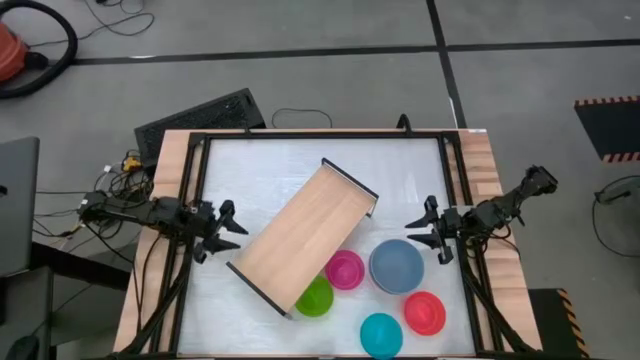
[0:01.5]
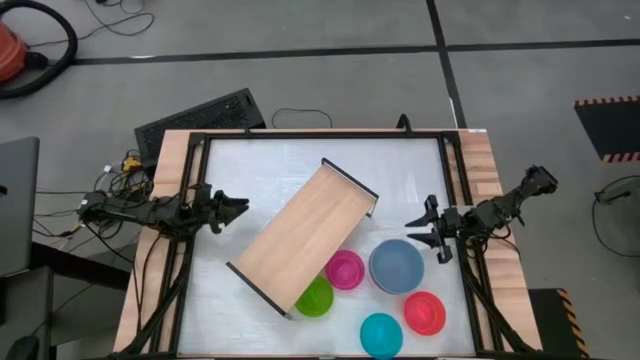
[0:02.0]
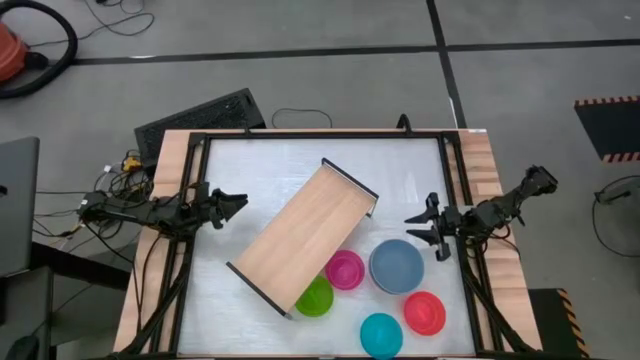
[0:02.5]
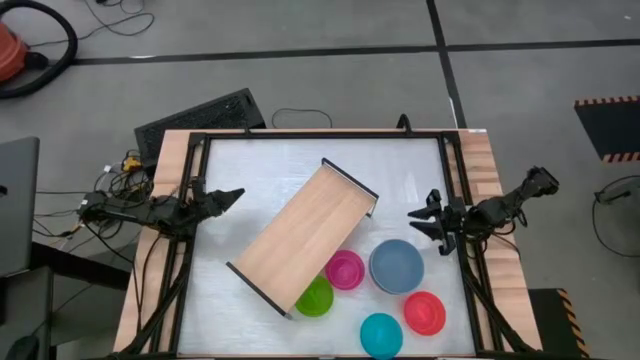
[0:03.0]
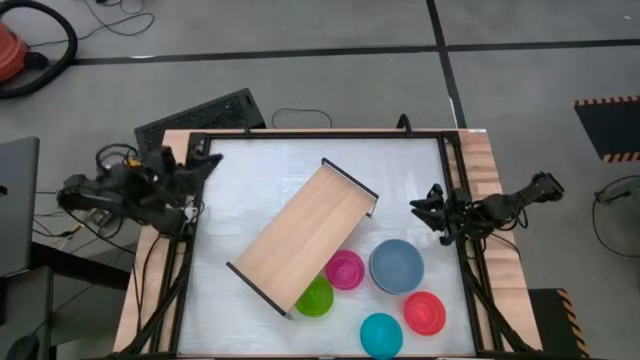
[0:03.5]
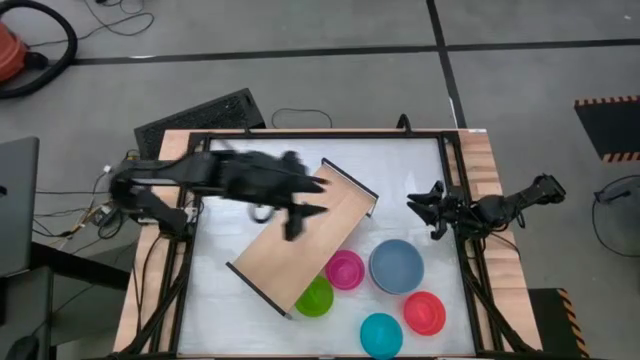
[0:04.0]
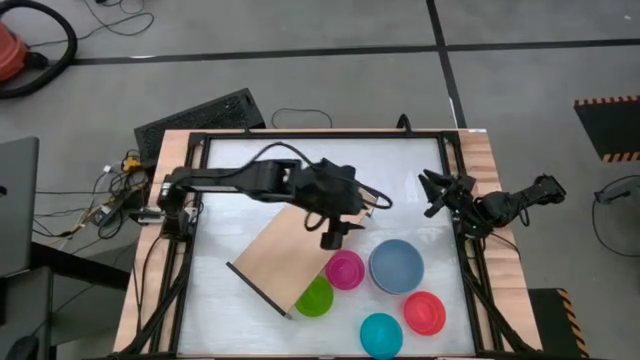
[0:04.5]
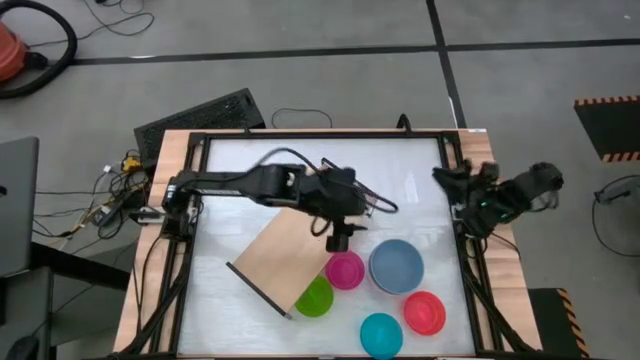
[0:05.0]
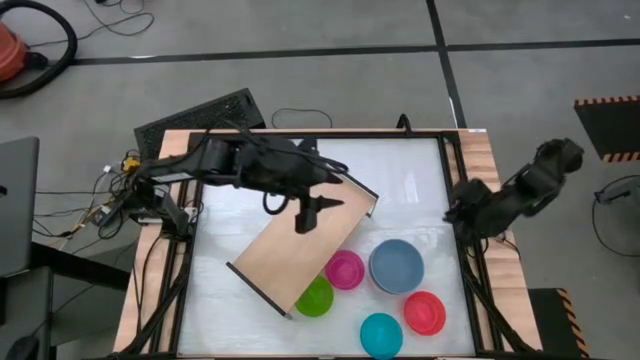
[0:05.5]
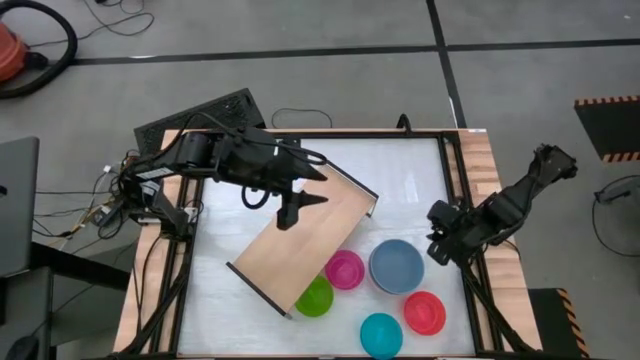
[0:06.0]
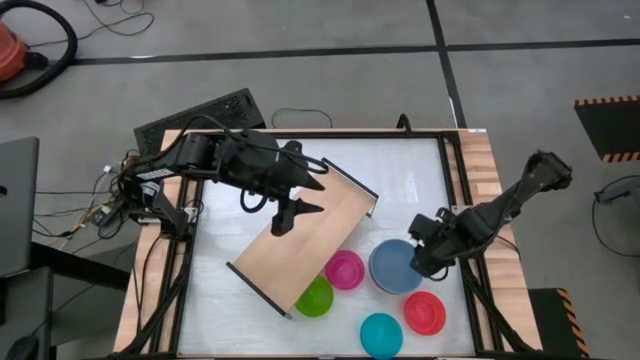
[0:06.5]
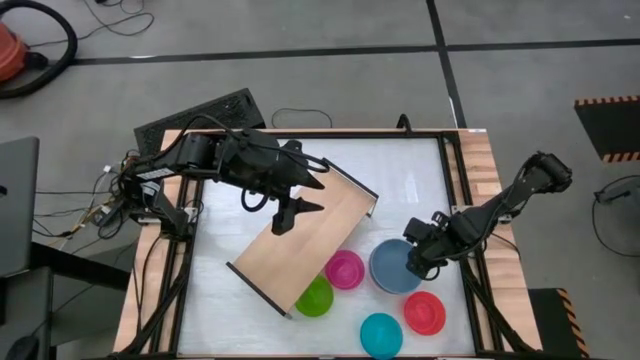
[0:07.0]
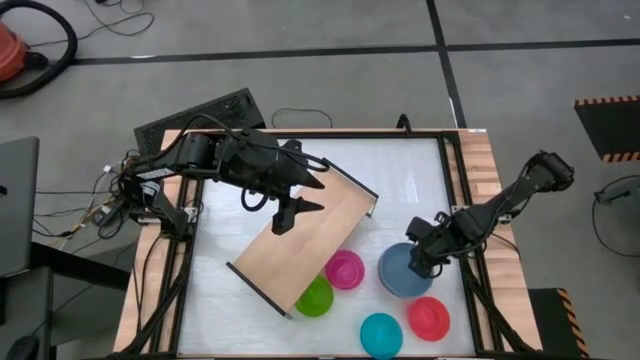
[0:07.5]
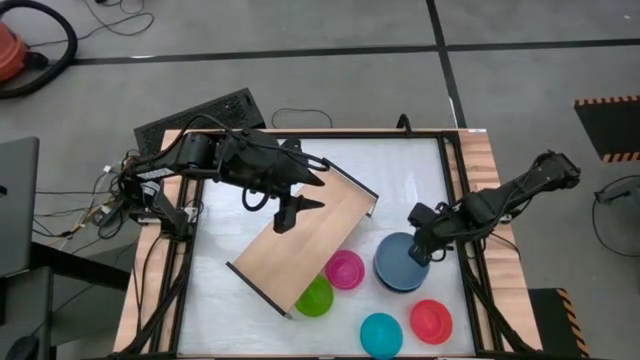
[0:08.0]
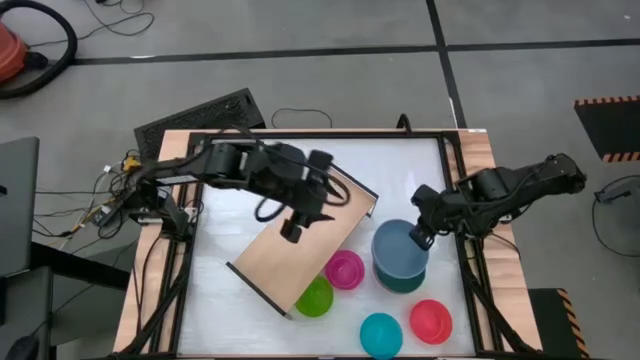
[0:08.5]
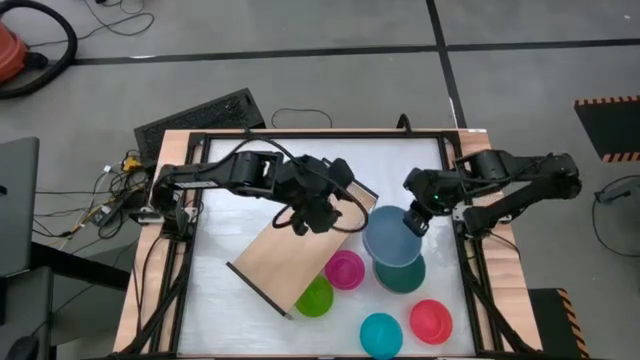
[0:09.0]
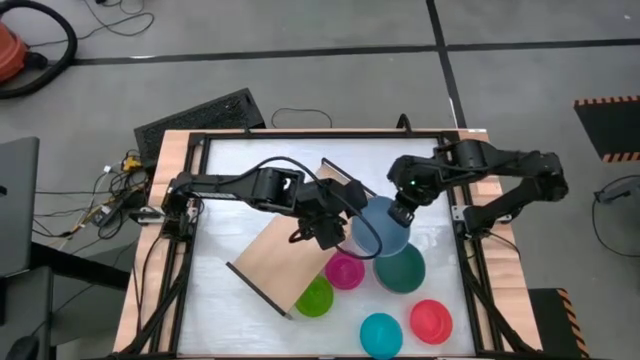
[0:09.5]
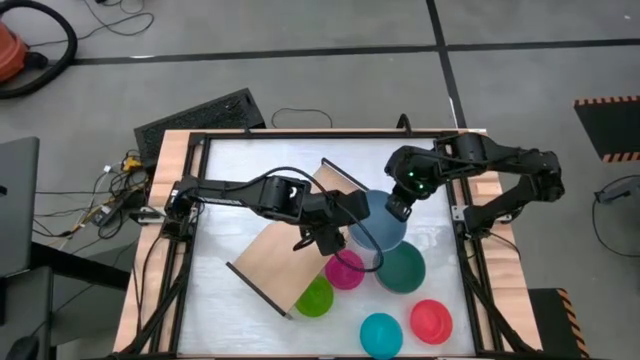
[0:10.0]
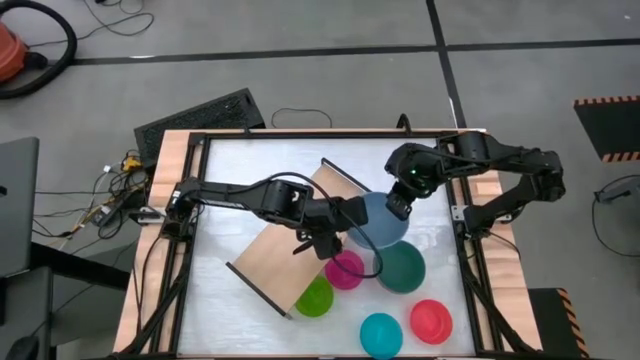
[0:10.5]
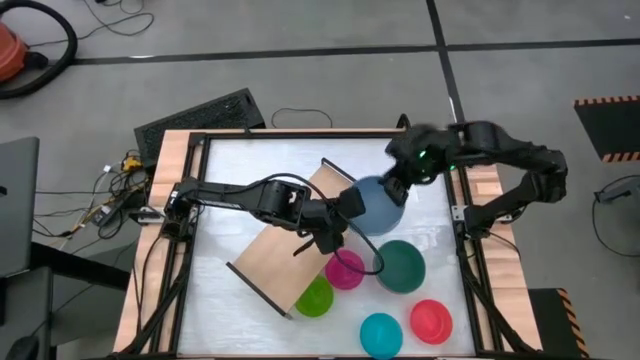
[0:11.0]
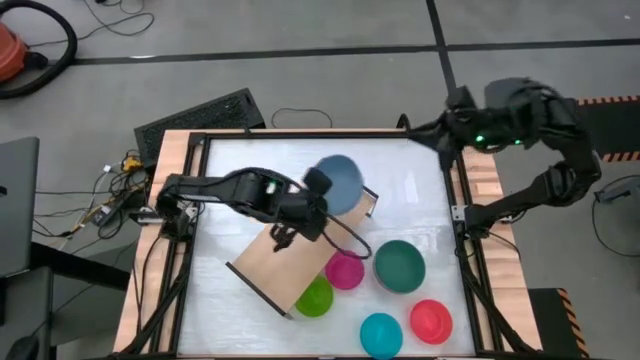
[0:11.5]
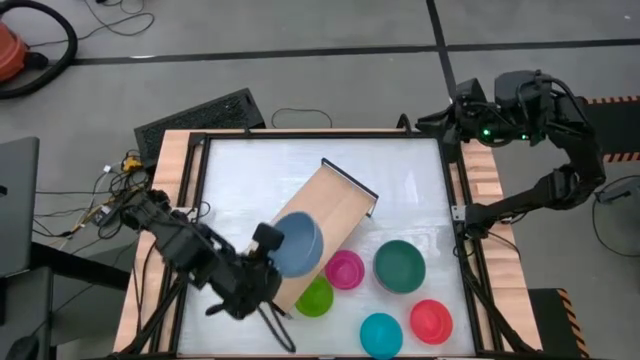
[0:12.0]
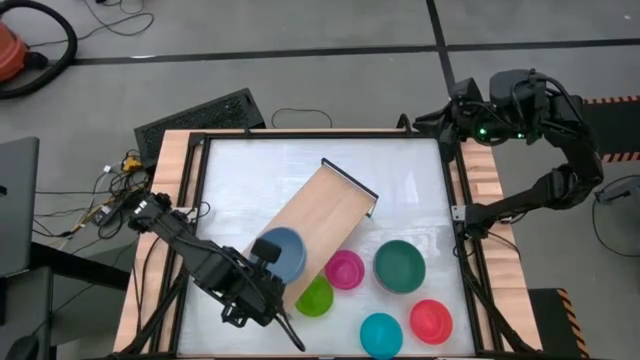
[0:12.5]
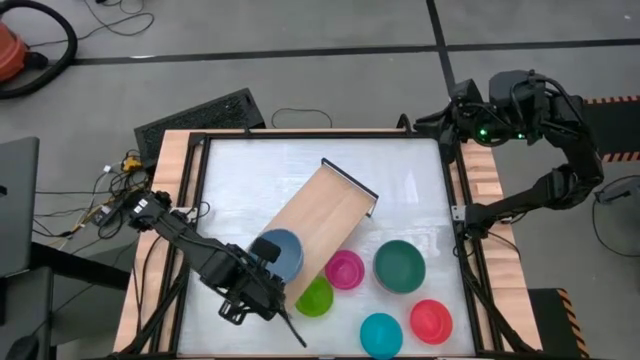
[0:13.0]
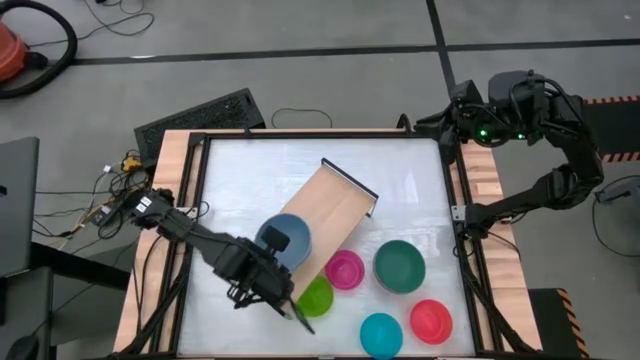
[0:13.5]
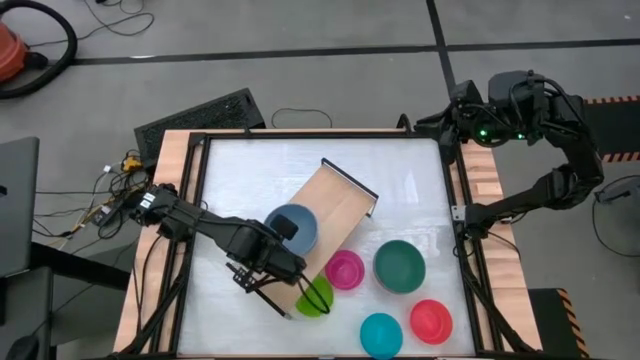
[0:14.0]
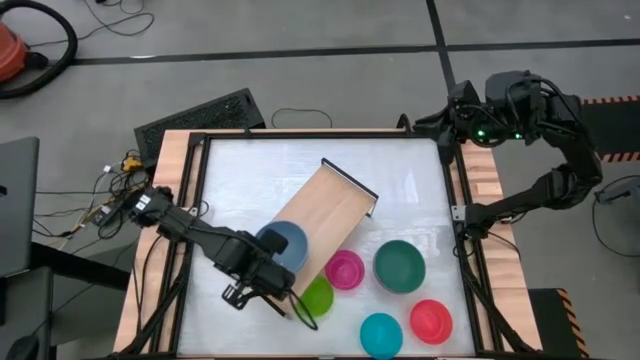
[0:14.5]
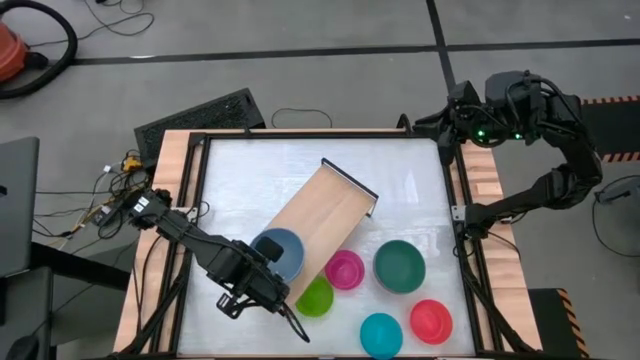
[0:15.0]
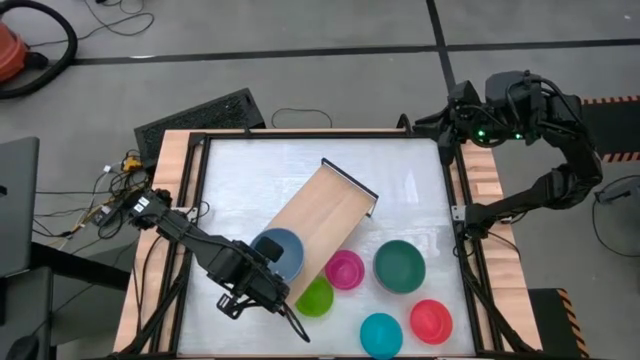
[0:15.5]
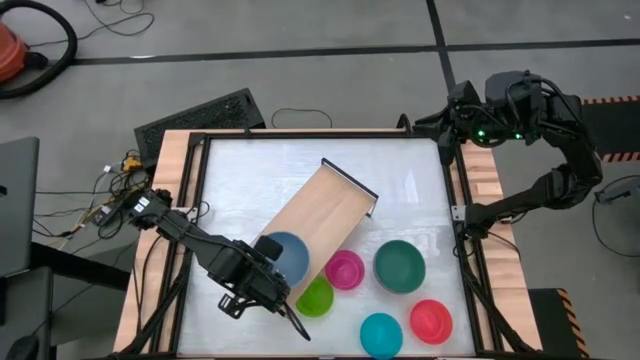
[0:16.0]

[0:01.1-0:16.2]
Task: Place and stack bowls onto a shelf
Put the blue bowl on the shelf
